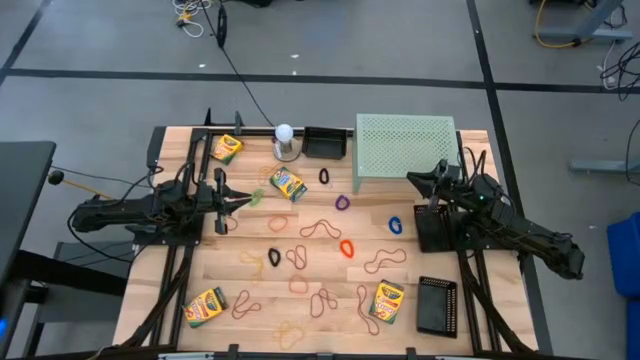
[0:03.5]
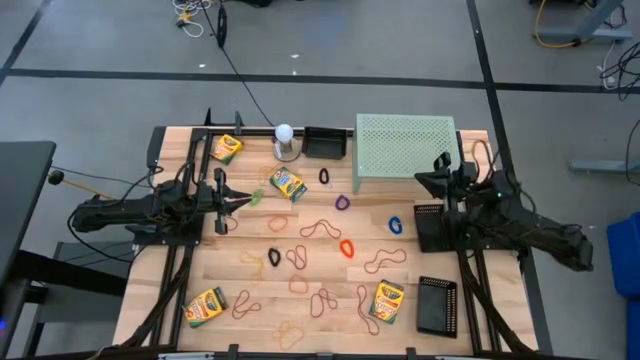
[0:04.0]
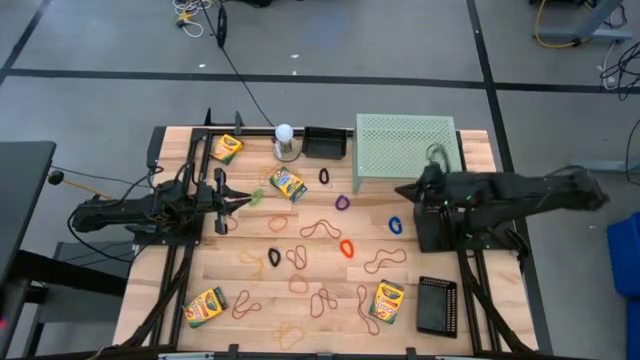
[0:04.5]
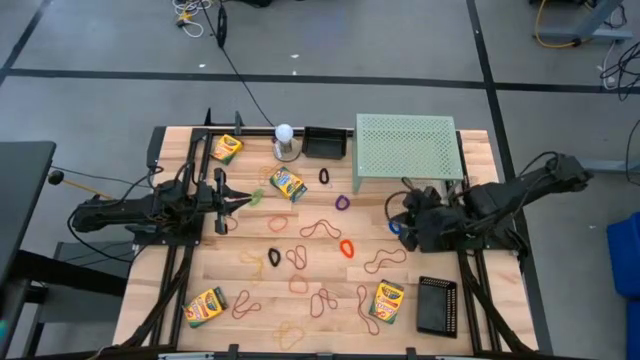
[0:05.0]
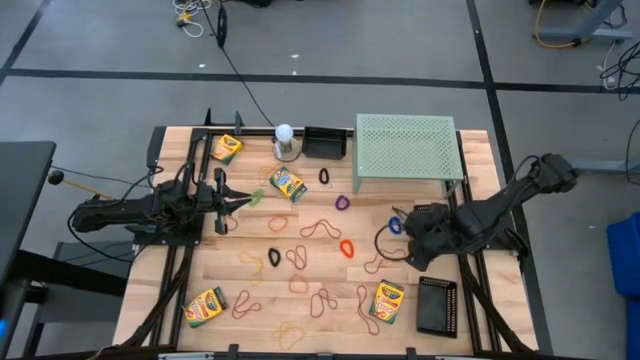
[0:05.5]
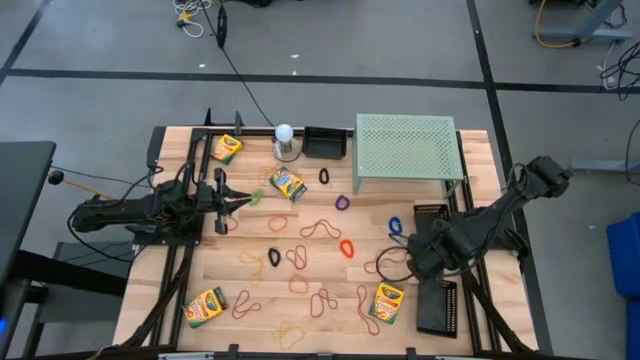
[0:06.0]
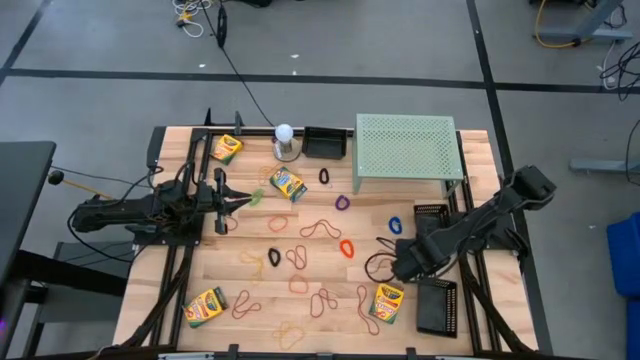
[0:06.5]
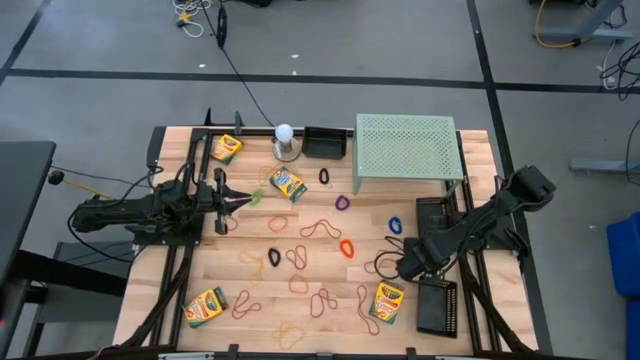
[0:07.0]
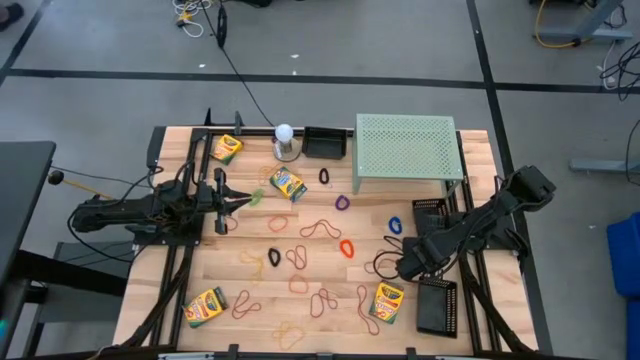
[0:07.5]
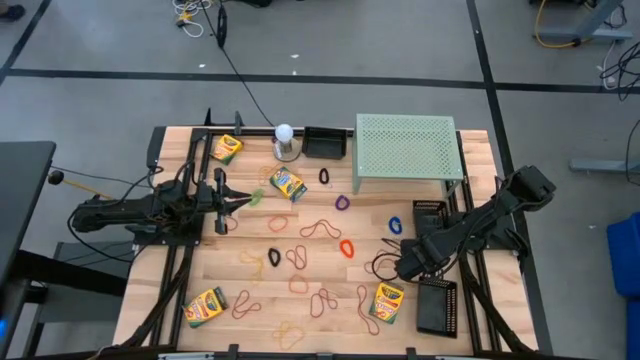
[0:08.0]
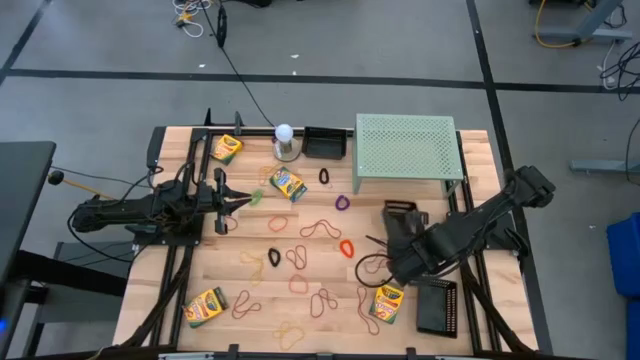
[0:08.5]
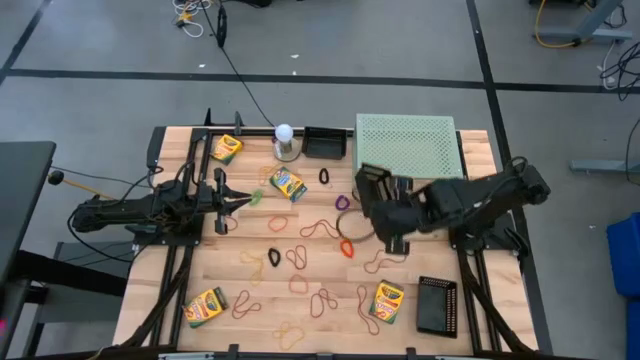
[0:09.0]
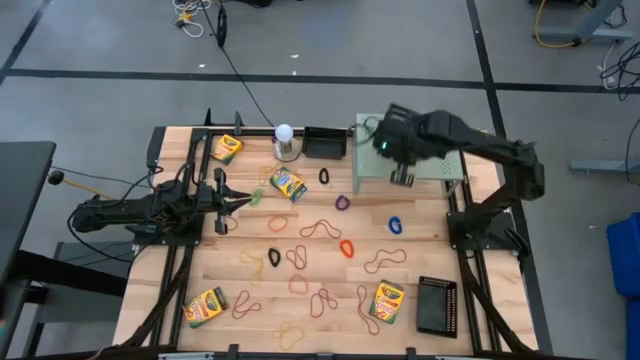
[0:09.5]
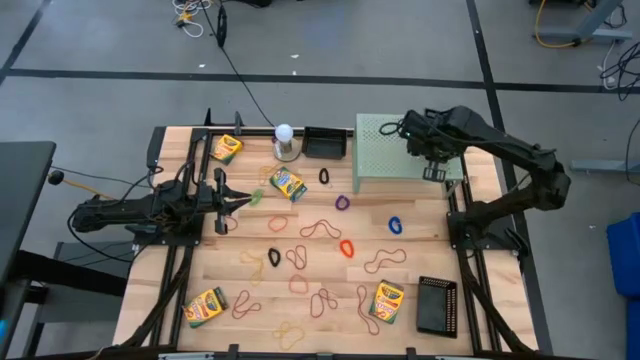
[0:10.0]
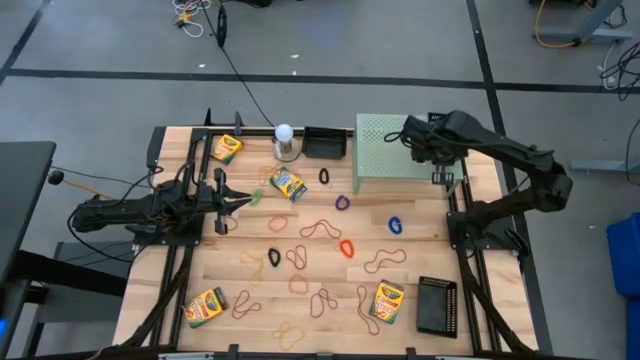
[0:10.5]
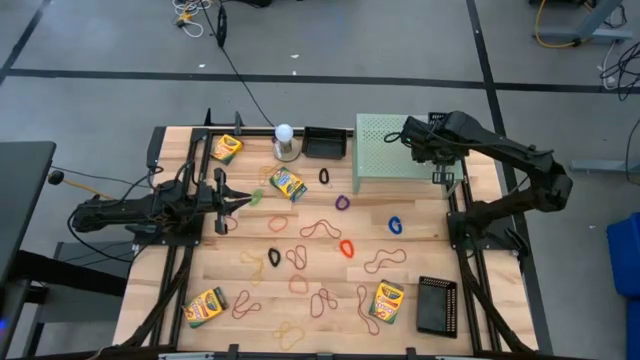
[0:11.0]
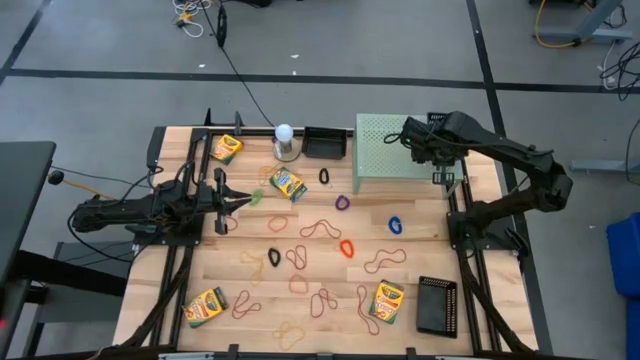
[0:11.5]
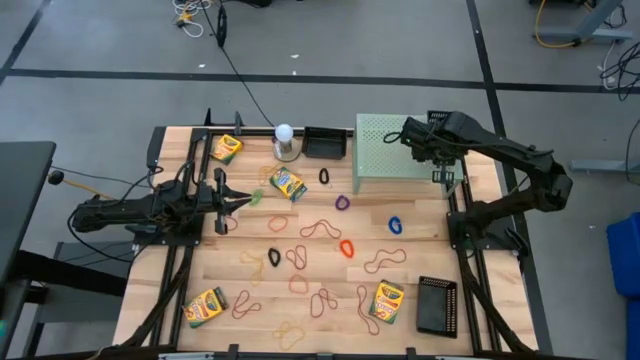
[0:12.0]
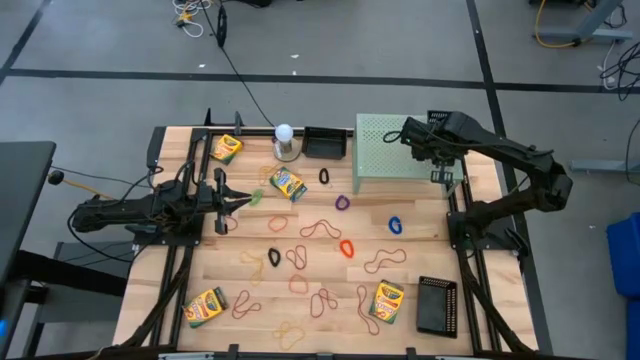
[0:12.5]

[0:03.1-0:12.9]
Task: Pick & Place Office Desk Supplies
Put the middle basket on the shelf

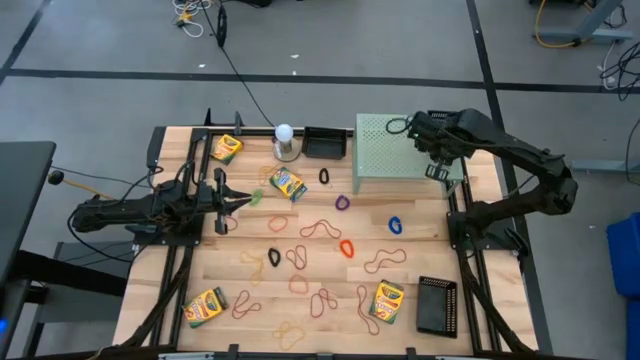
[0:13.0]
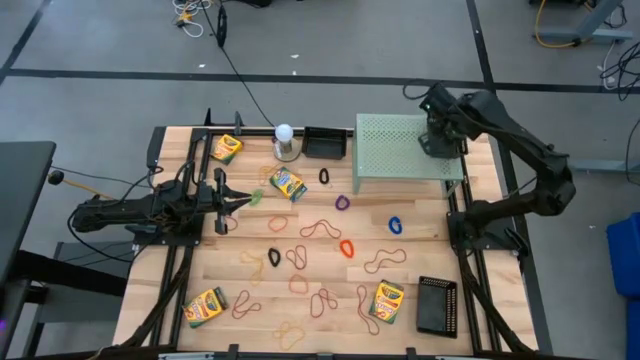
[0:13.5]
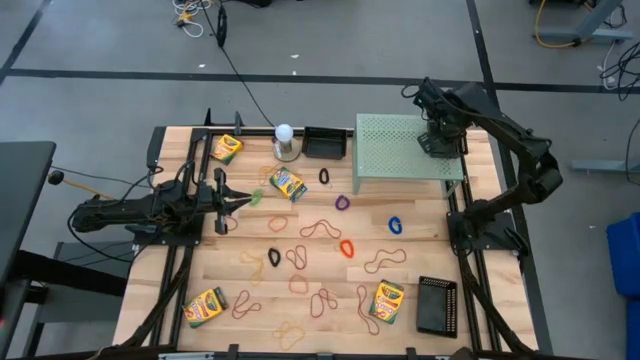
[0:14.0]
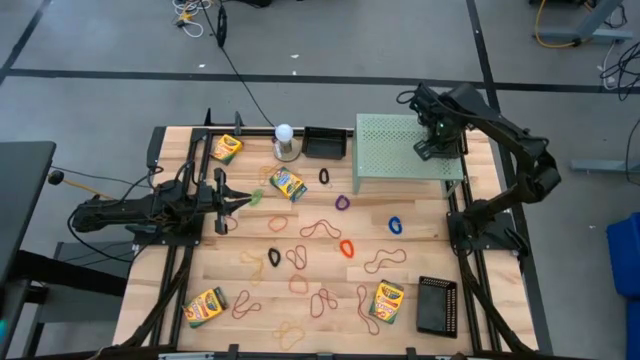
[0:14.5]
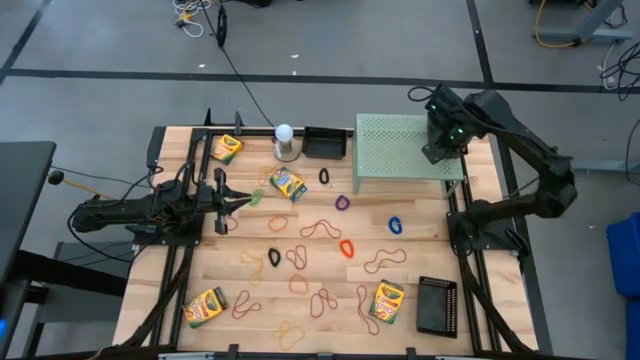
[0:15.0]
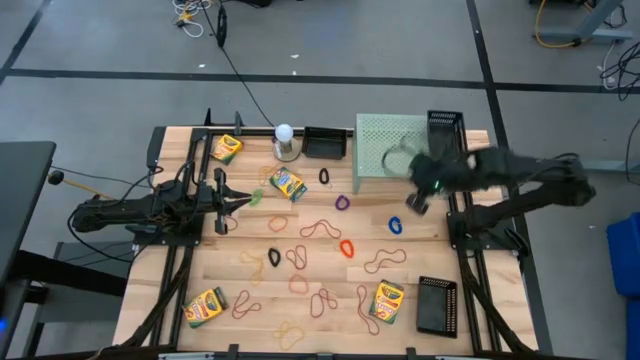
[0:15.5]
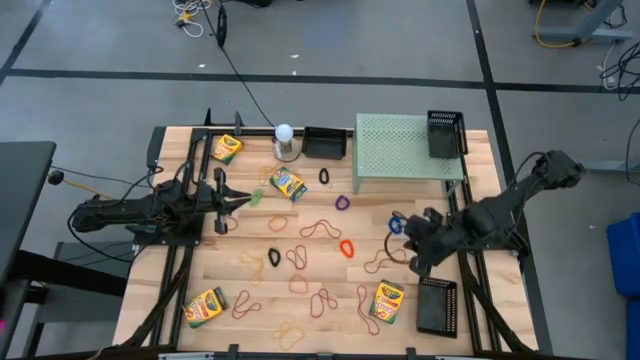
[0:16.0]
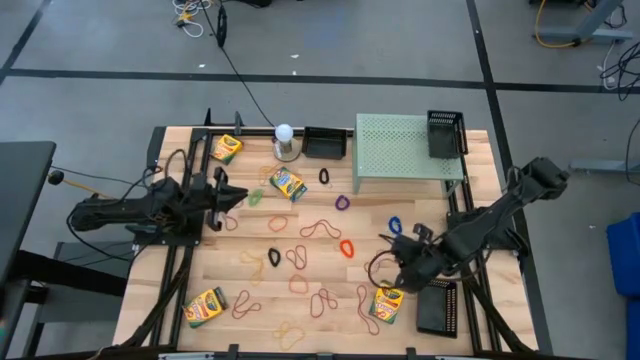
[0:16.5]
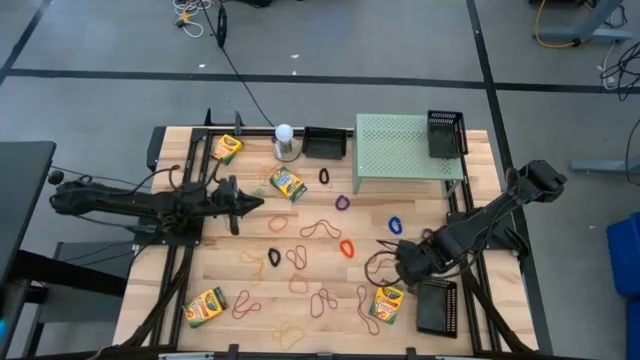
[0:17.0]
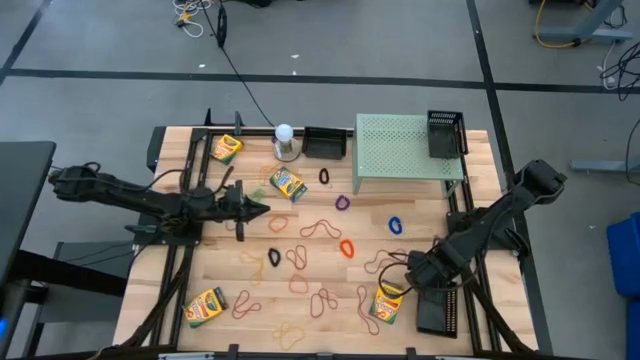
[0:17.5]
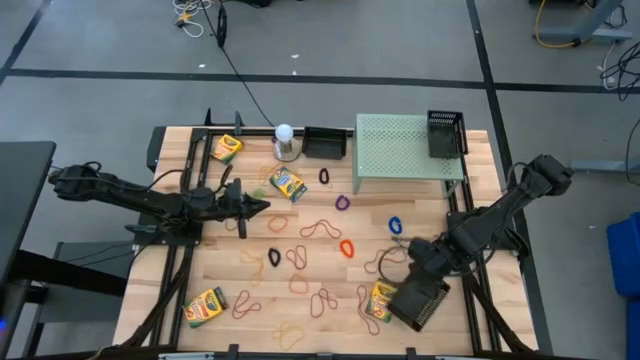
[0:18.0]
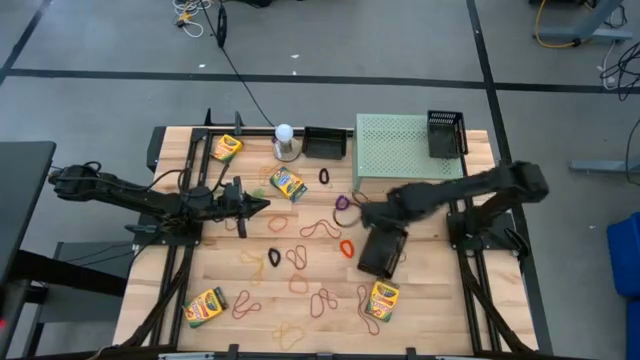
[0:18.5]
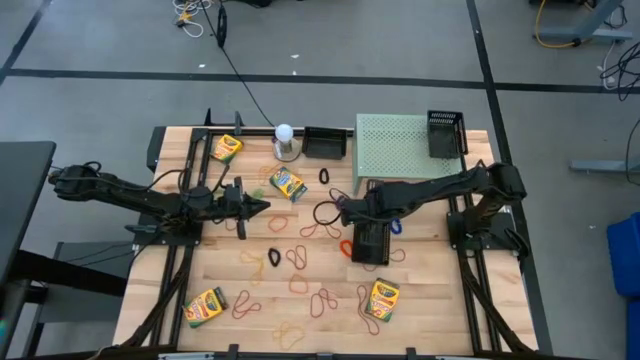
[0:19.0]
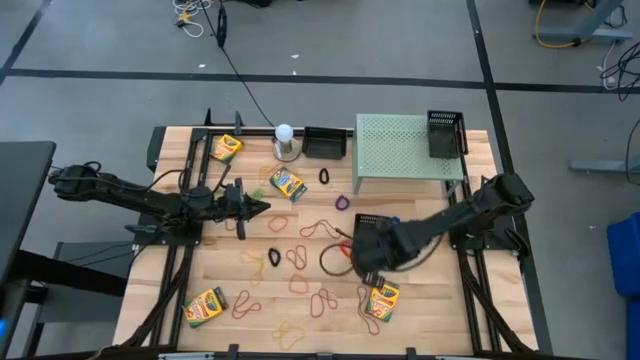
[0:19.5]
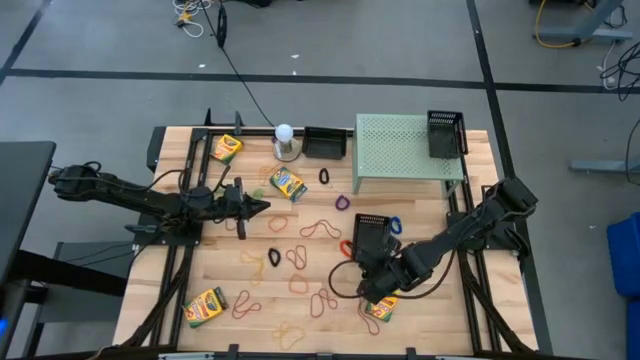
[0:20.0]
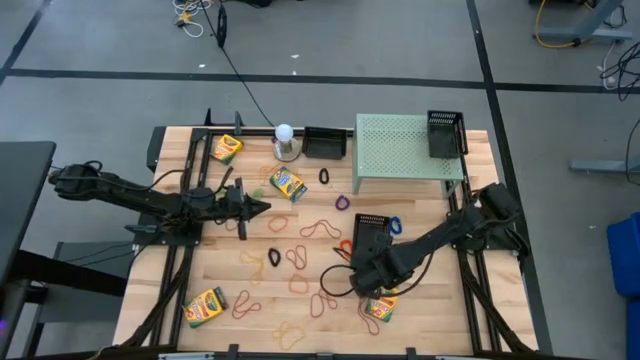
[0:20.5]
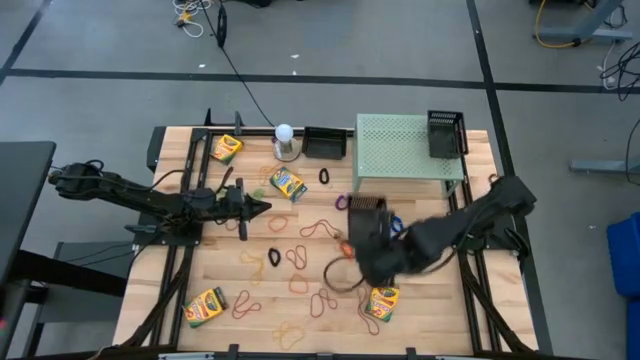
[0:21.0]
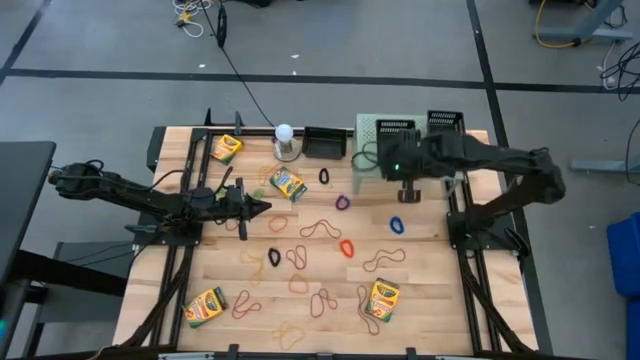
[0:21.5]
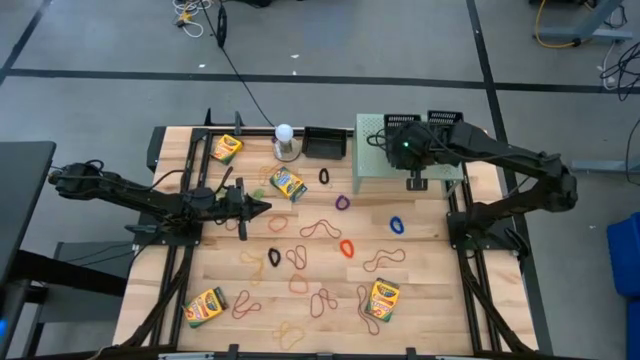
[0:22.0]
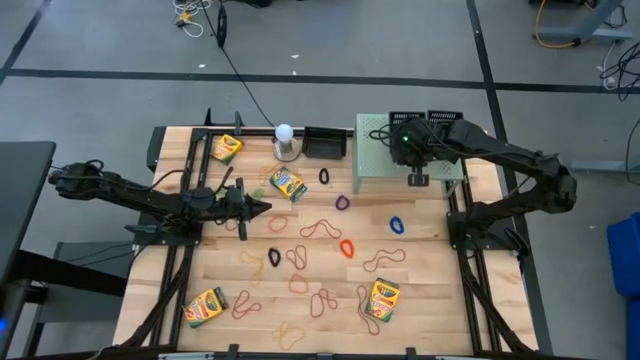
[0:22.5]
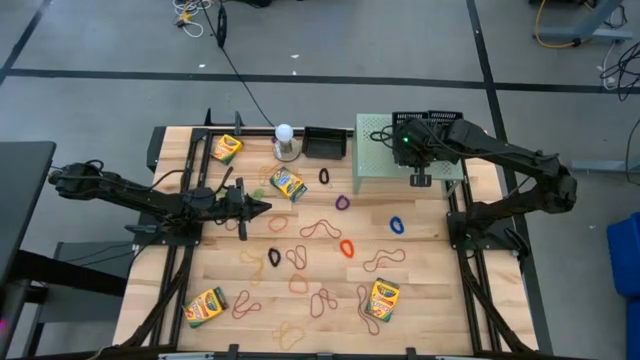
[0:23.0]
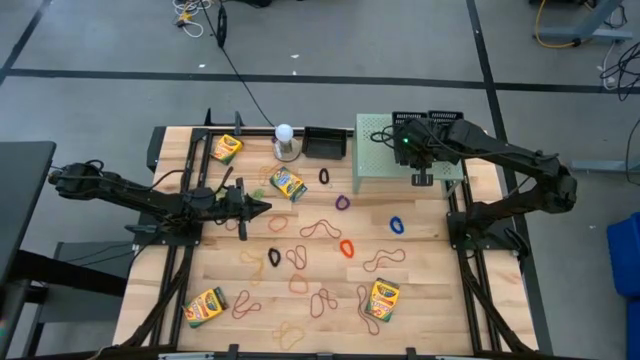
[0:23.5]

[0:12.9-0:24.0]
Put the bottom basket on the shelf
